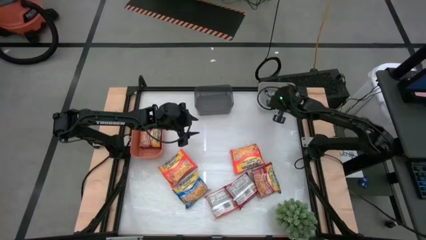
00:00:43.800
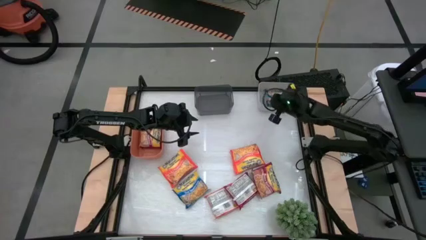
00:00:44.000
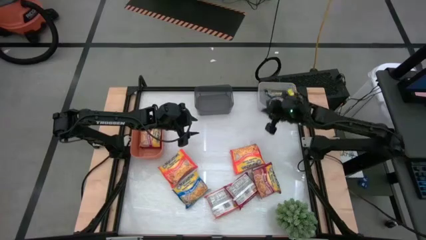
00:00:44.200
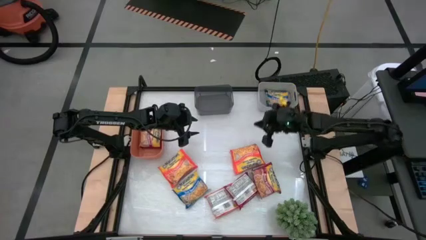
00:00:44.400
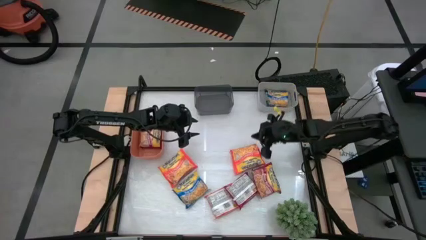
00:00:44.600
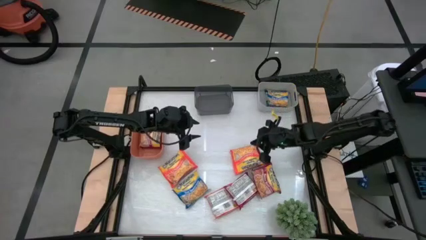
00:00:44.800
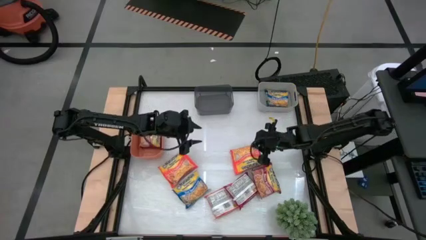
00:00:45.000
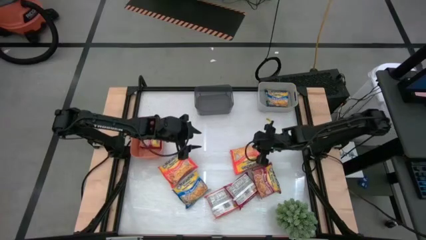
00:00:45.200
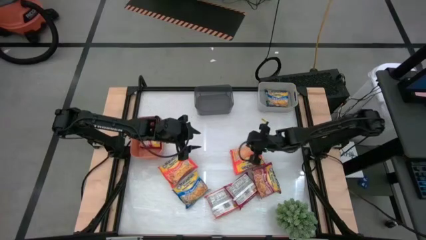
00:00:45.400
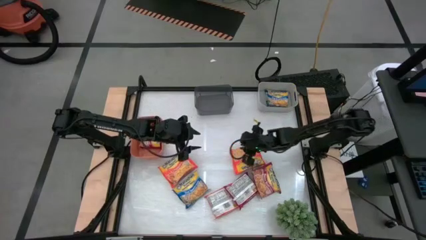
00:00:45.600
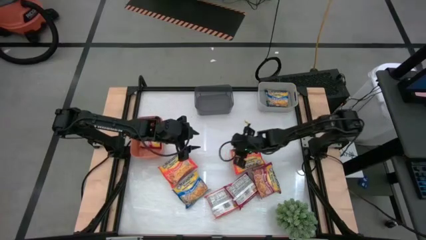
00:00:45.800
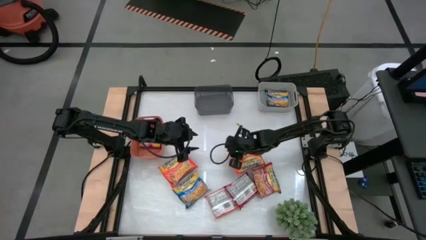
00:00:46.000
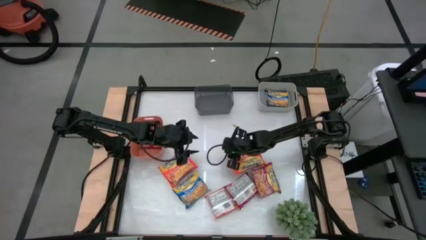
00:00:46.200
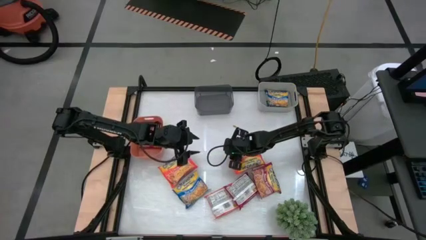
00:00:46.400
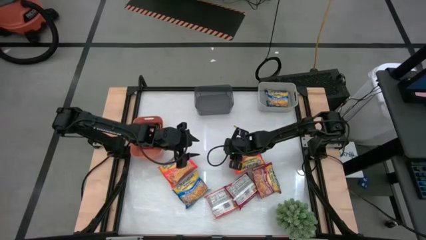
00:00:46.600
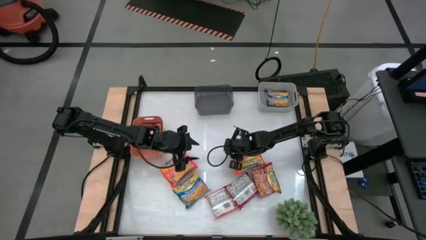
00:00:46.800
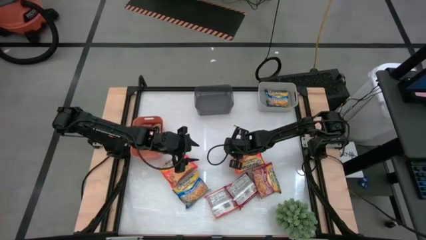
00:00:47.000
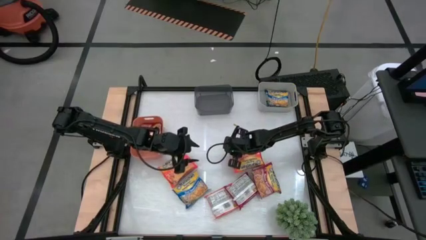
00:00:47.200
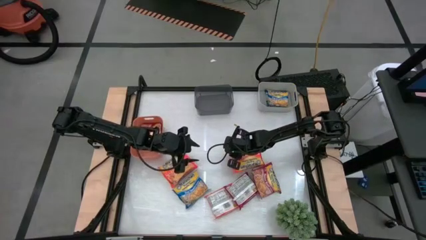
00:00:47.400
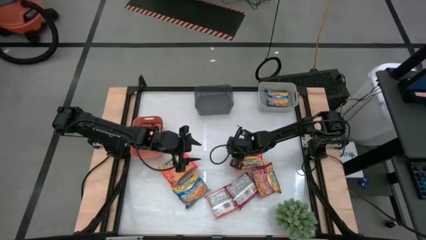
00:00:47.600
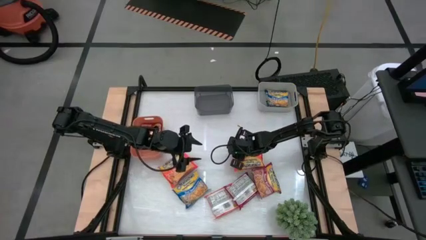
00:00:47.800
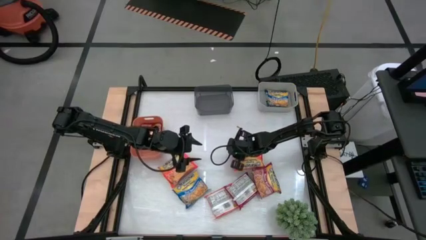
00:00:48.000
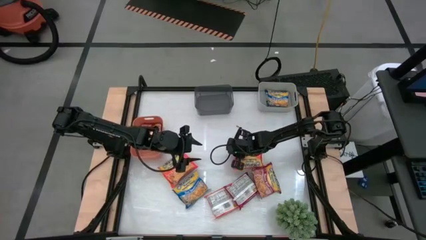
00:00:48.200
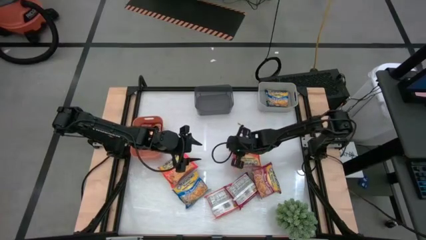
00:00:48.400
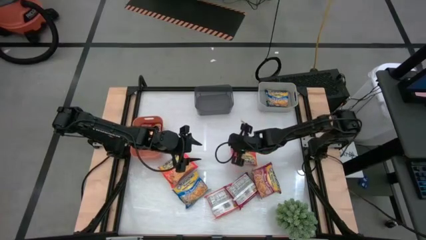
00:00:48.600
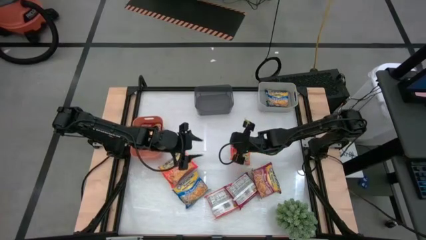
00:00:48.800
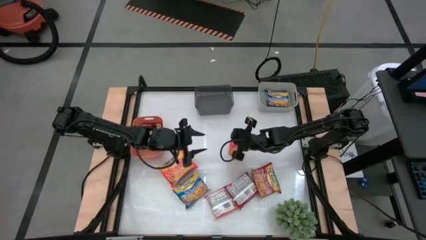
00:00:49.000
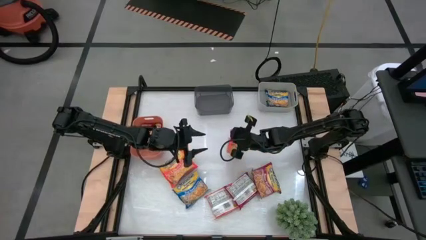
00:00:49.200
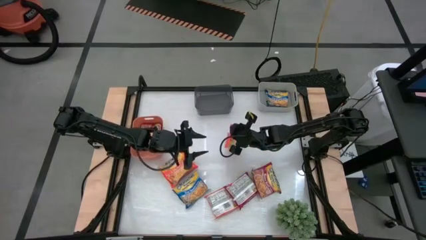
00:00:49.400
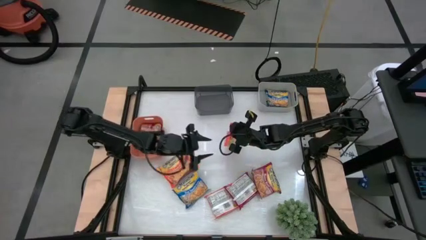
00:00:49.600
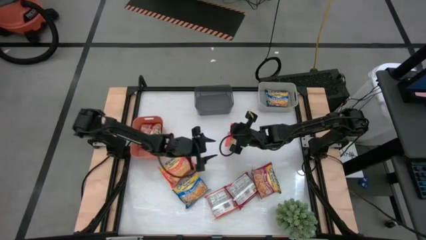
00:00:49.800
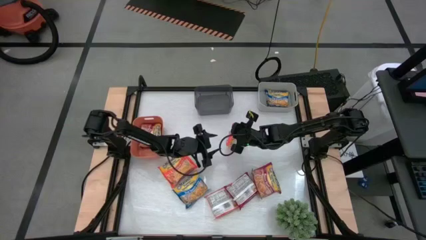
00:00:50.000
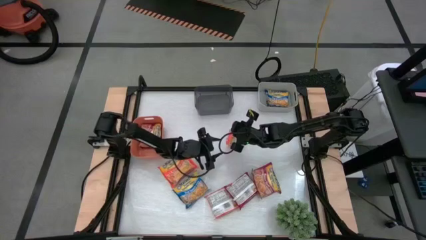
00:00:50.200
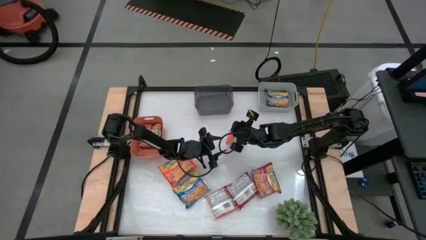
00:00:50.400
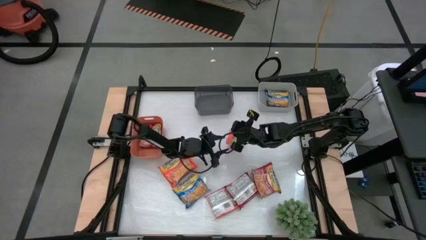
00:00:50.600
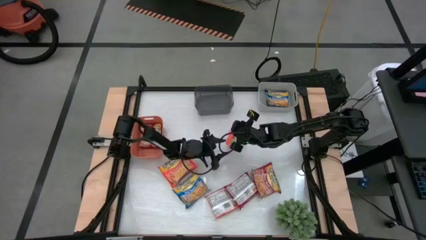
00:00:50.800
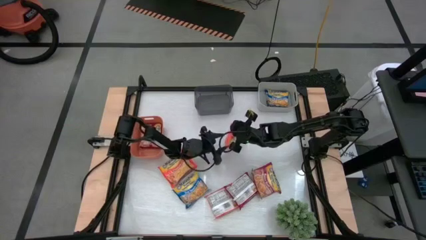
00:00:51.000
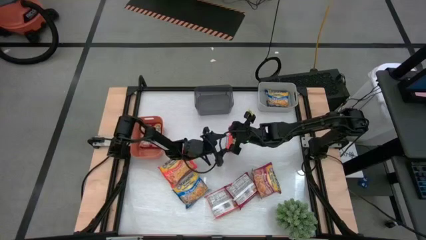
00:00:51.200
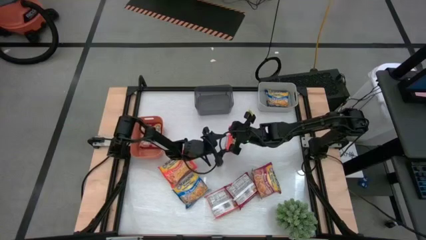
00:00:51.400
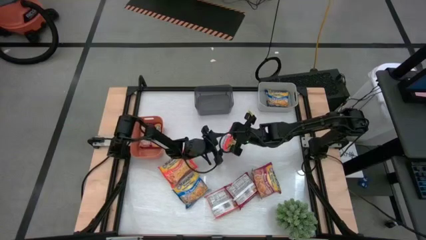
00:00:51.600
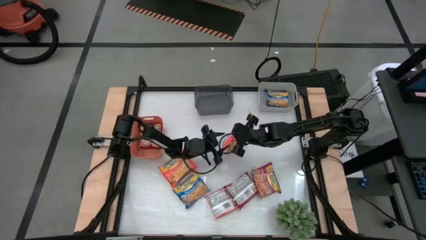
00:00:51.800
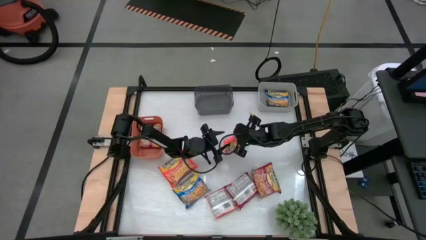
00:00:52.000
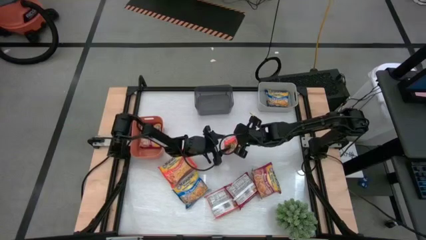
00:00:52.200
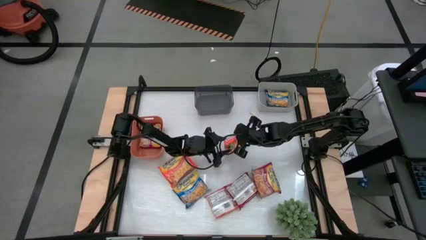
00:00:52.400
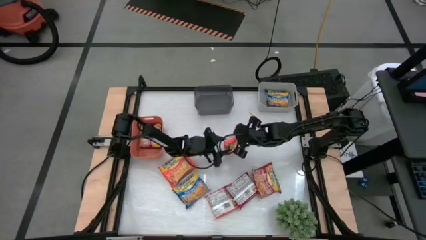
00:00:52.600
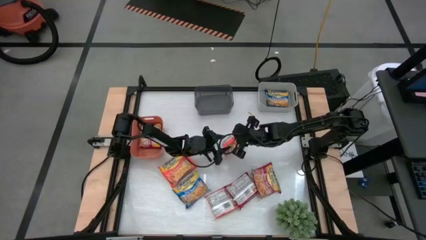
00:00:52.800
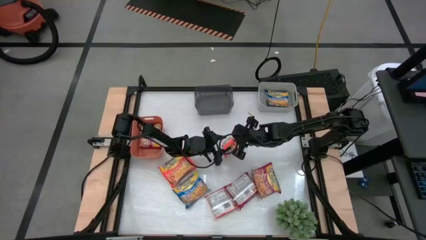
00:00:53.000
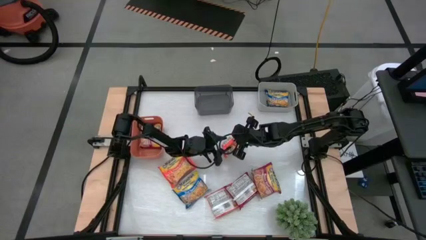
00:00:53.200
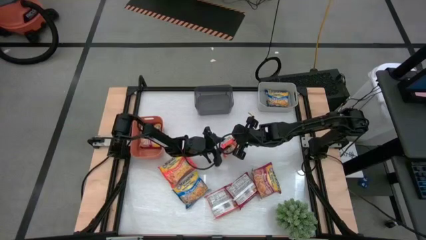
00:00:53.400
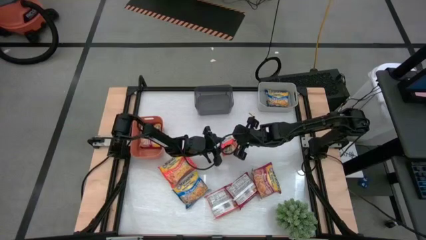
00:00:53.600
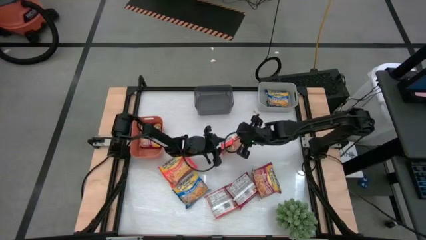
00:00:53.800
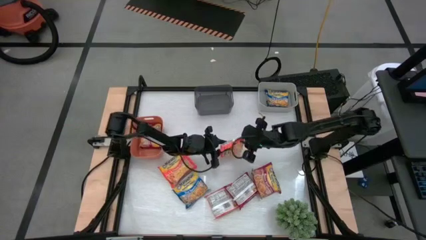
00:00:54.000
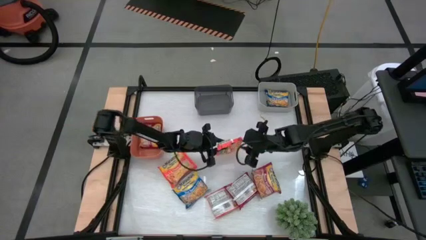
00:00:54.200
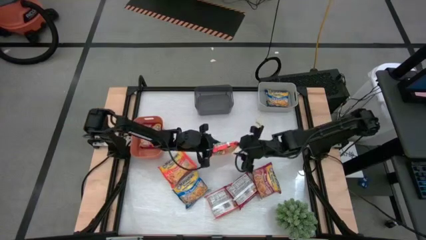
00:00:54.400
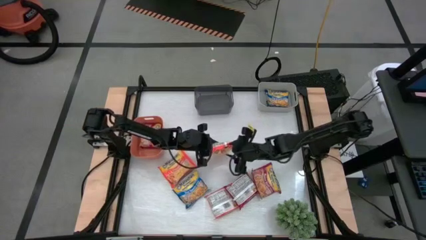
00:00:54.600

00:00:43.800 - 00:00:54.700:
Task: Sort Maruchan noodles
Put the top right orange noodle pack into the black bin

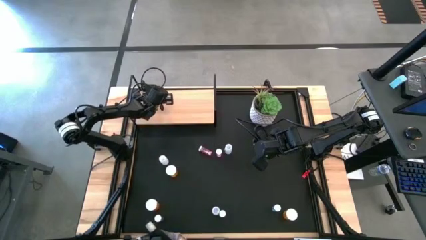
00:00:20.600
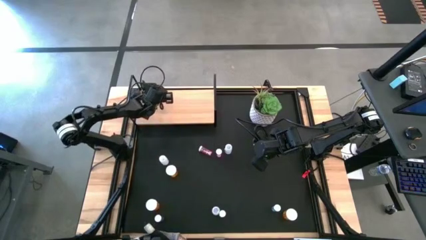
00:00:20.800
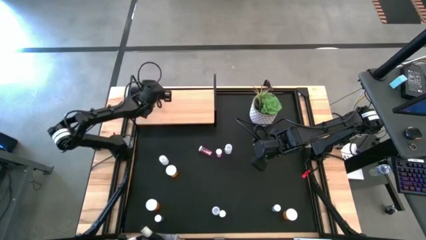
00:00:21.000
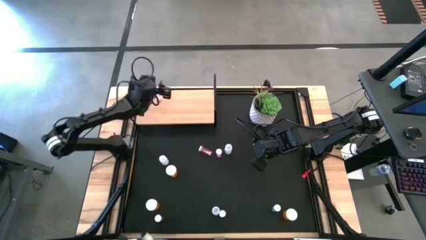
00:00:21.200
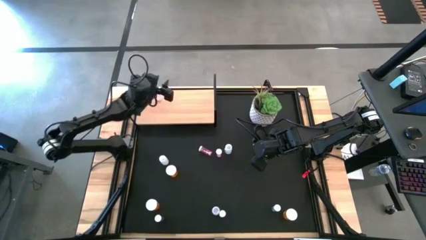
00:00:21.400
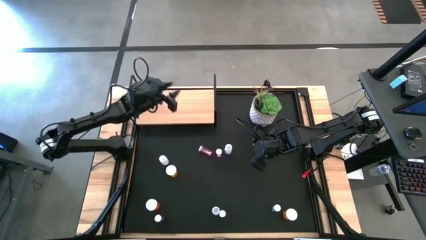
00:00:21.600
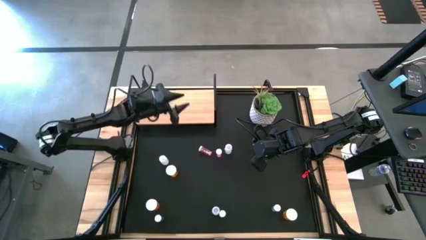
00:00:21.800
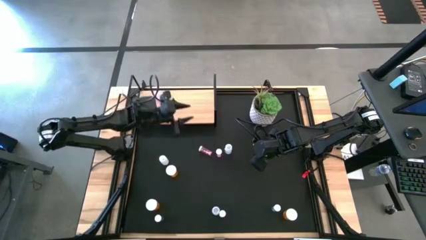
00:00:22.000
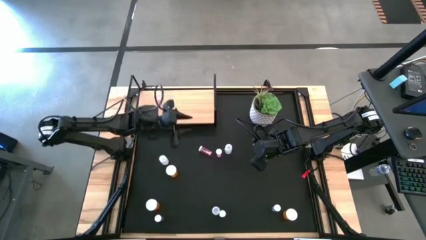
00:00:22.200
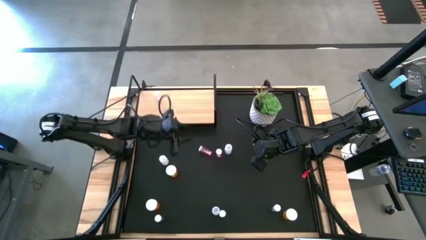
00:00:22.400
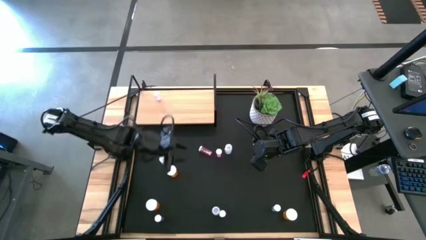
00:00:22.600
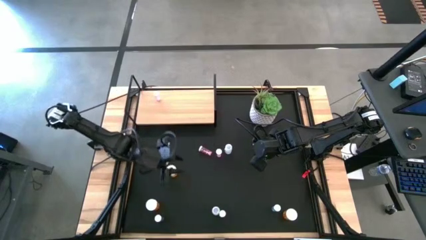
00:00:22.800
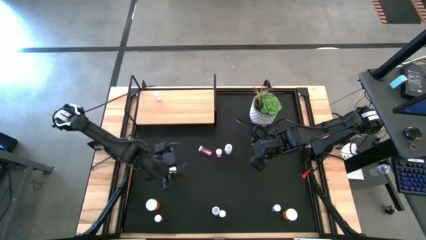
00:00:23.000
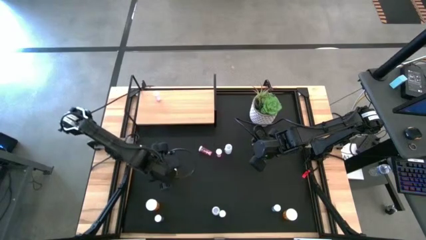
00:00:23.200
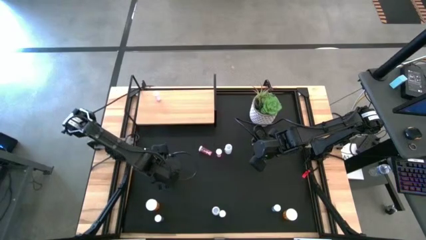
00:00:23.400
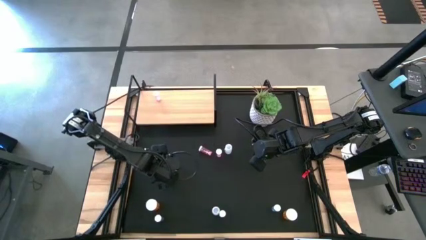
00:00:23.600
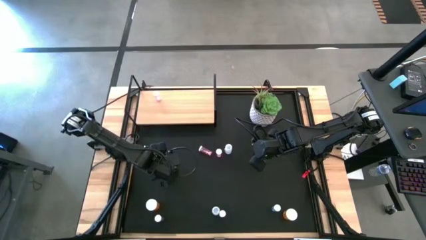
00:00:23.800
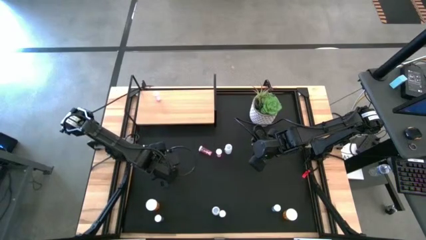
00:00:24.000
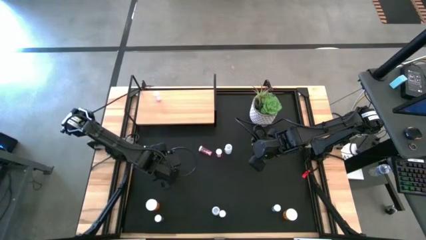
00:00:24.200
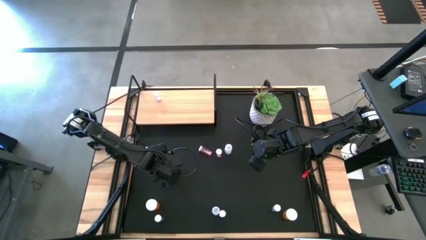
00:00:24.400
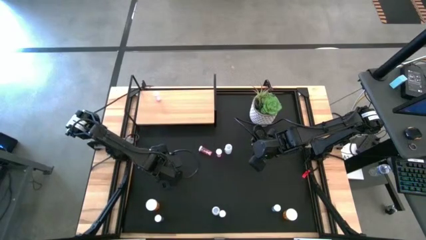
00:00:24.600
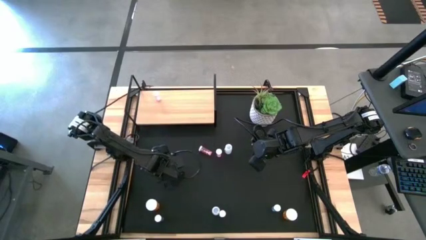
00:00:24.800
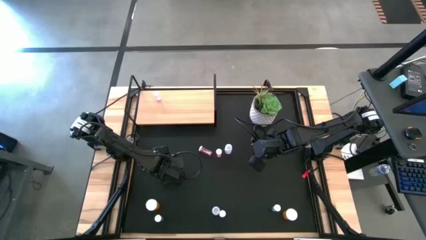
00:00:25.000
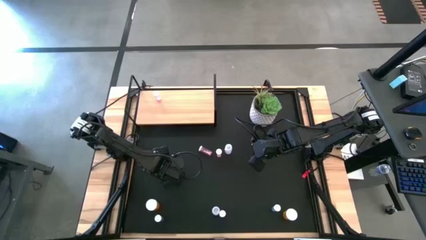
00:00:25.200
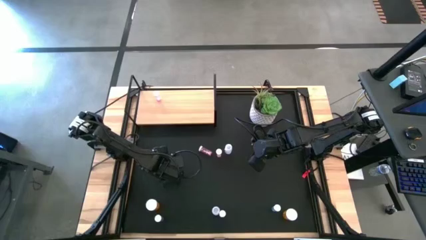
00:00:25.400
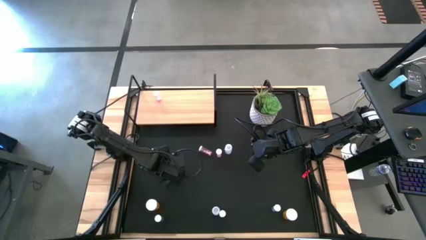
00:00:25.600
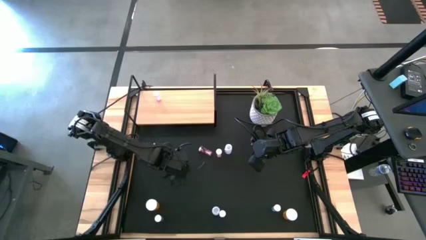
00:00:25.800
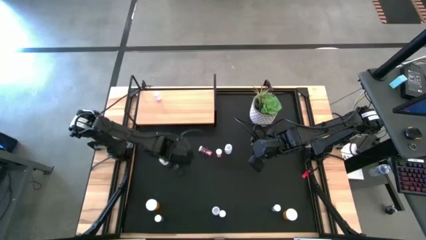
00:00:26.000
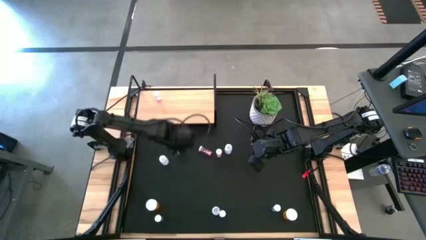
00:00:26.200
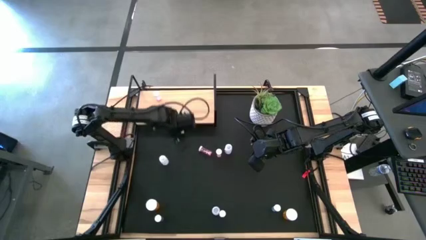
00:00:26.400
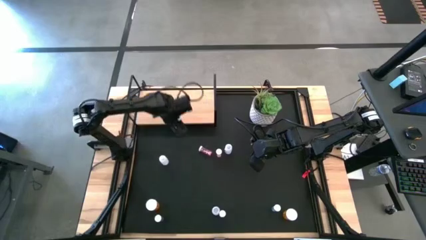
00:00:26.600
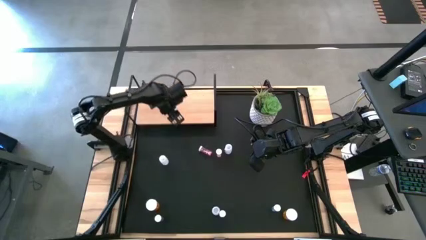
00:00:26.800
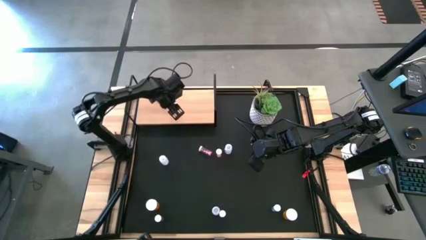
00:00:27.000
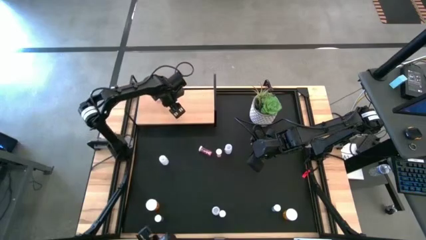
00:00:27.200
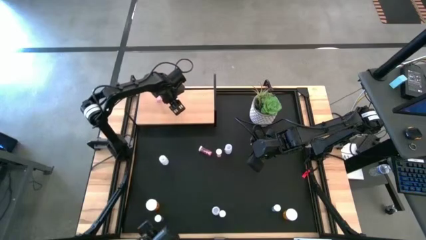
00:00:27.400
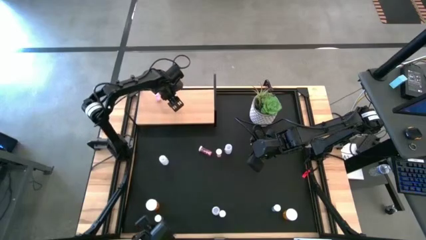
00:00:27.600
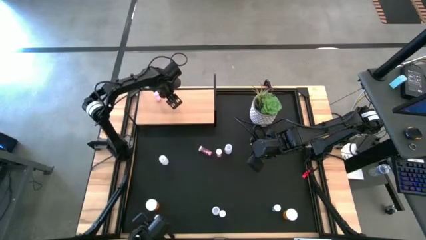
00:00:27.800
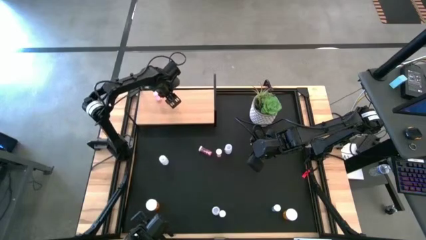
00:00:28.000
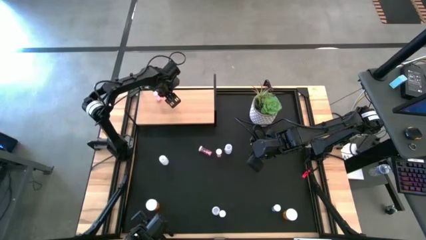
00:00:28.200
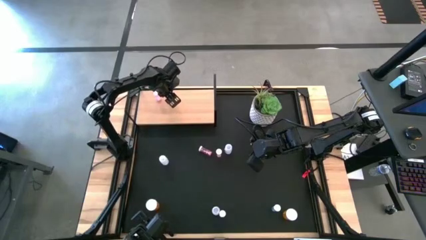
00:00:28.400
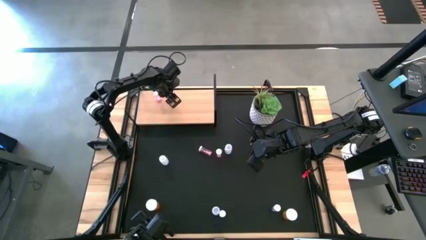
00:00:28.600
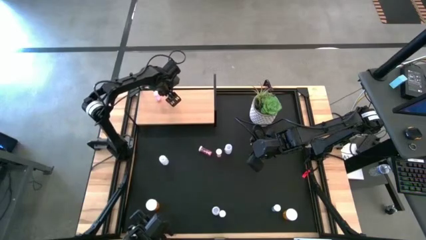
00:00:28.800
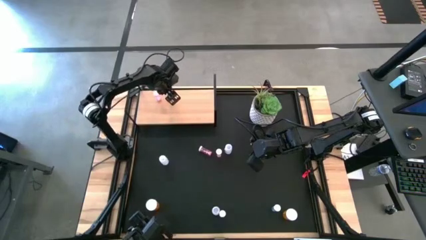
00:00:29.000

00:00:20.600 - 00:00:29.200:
Task: Pick and place medicine bottles onto shelf by color
Put the top orange pill bottle on the shelf
